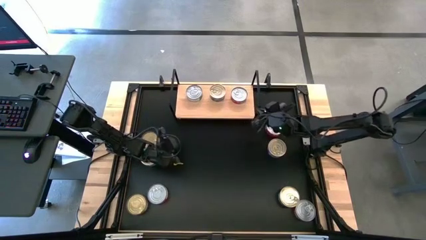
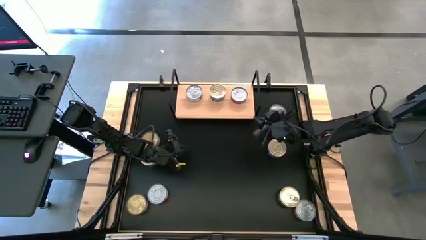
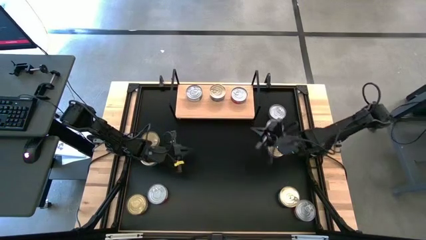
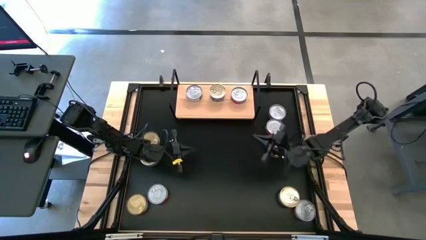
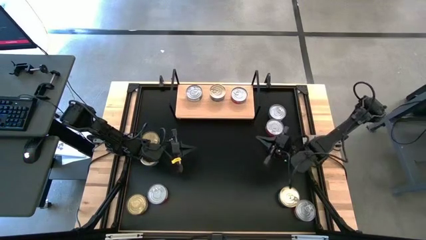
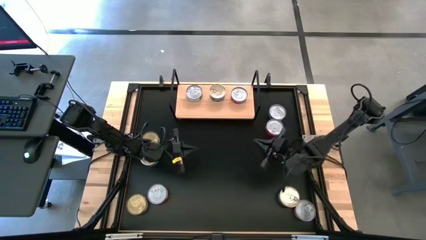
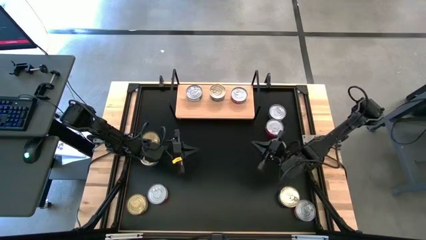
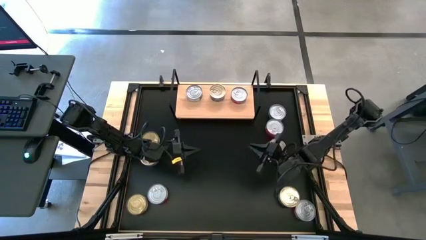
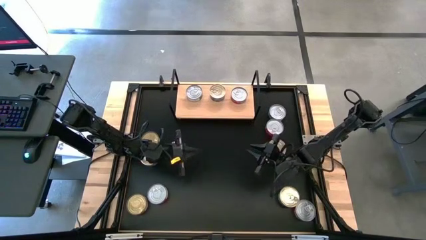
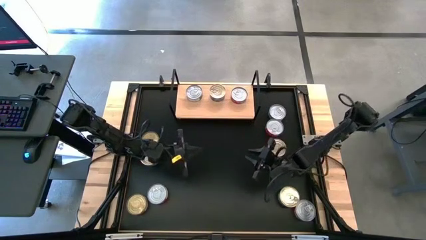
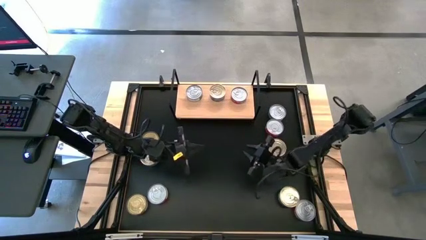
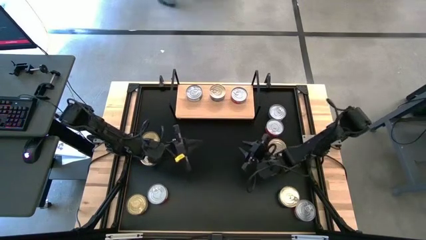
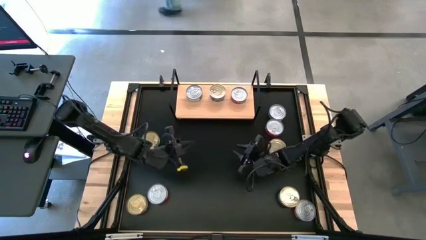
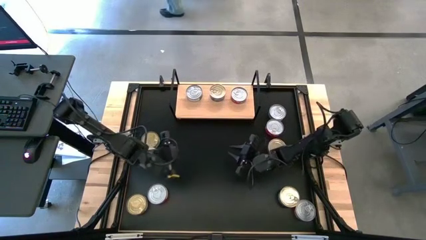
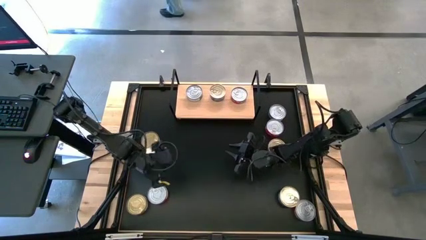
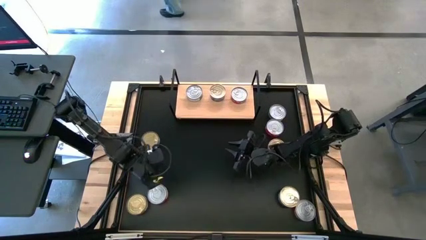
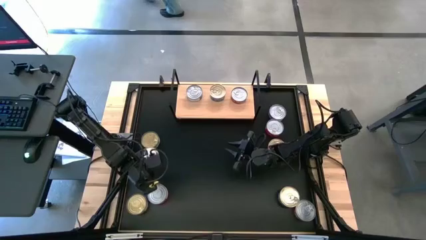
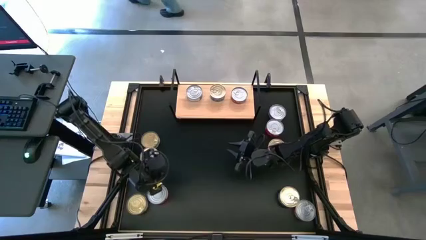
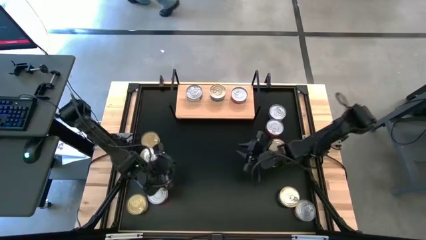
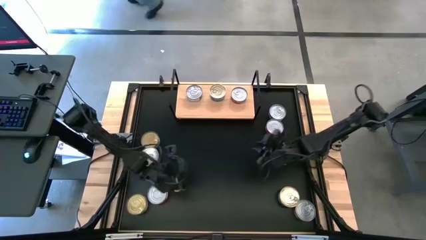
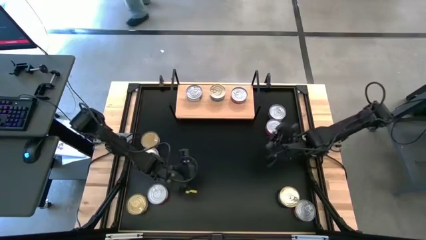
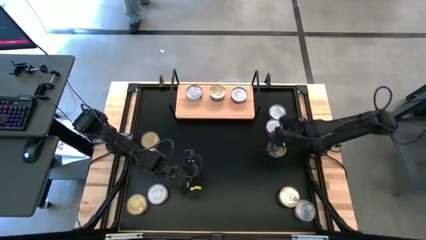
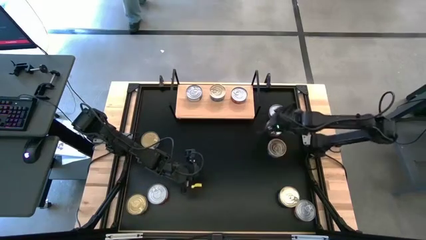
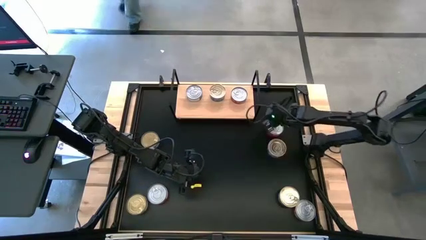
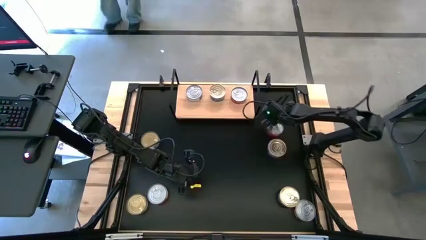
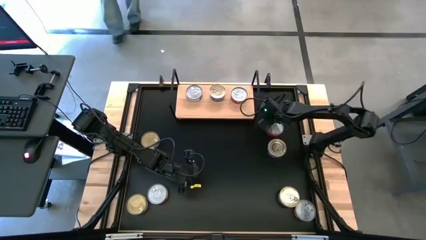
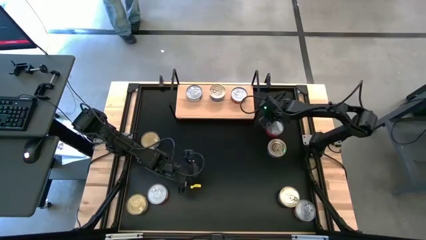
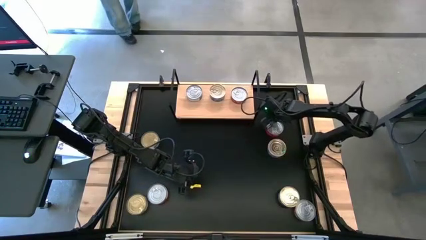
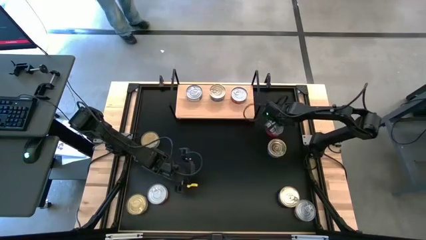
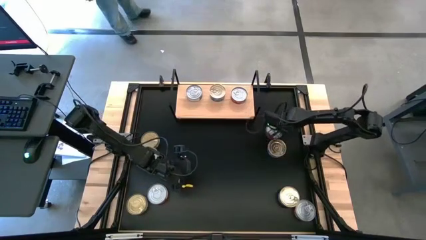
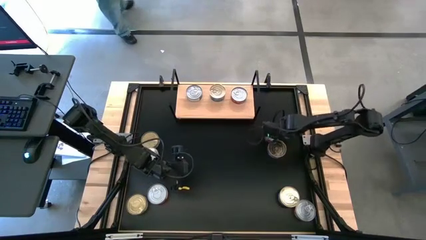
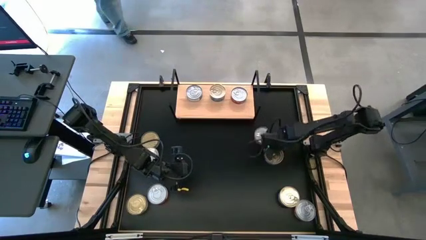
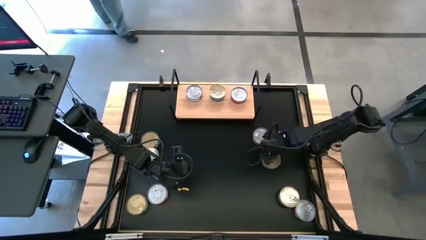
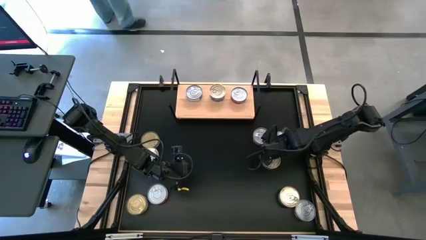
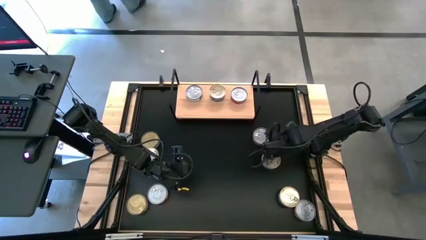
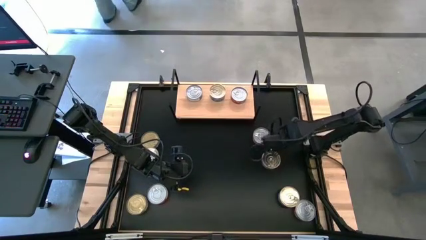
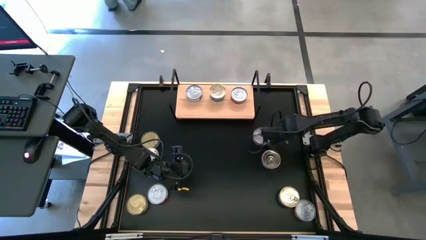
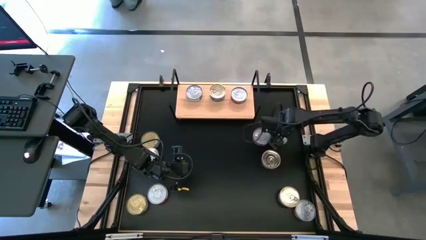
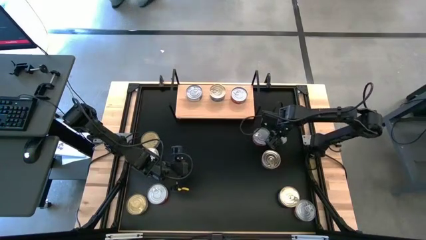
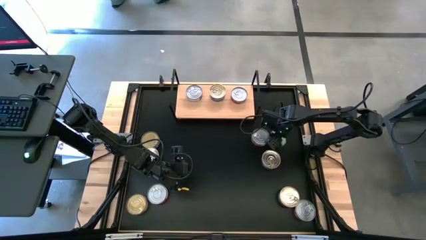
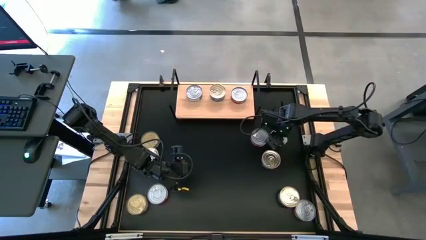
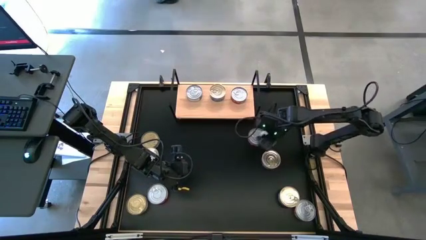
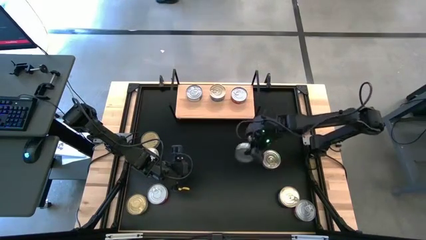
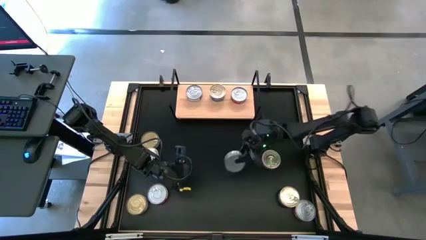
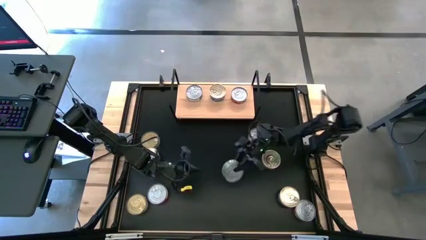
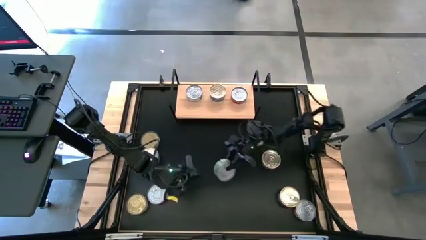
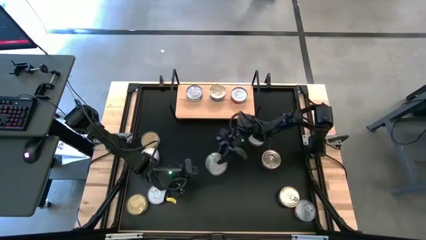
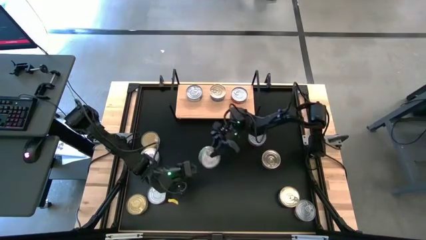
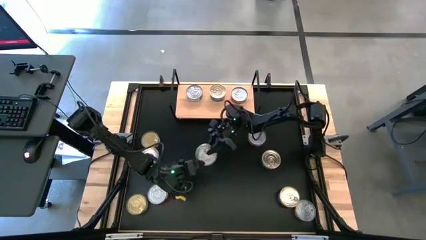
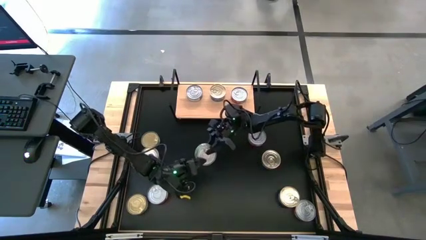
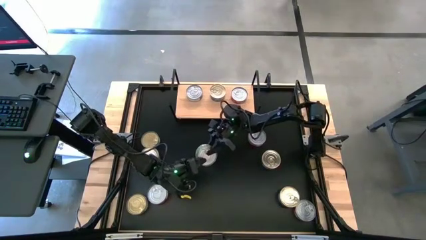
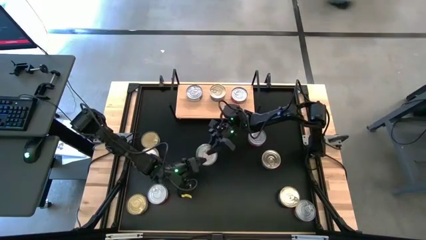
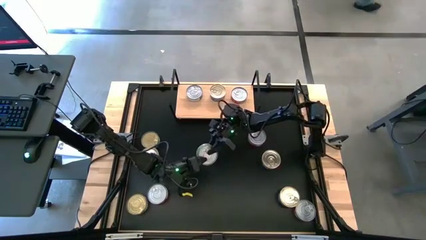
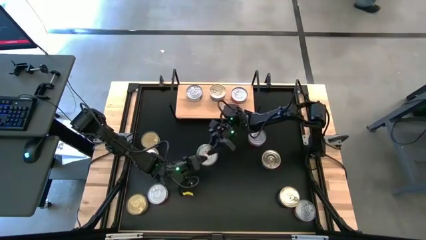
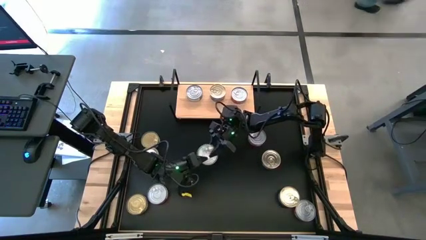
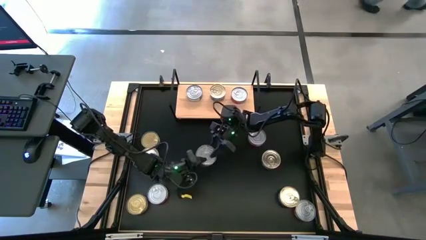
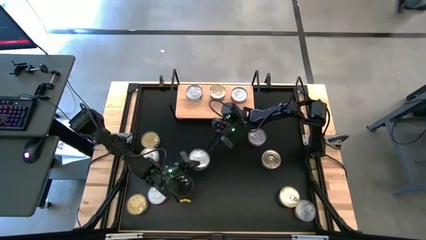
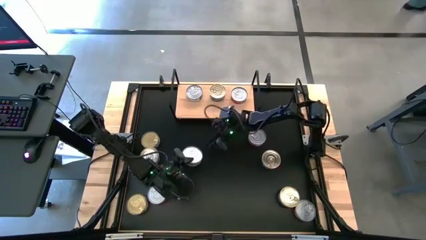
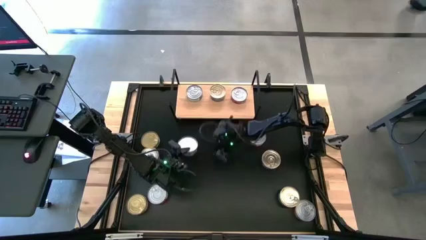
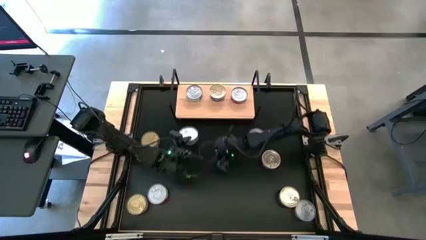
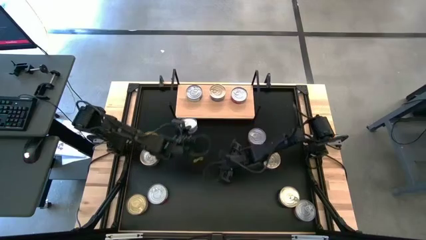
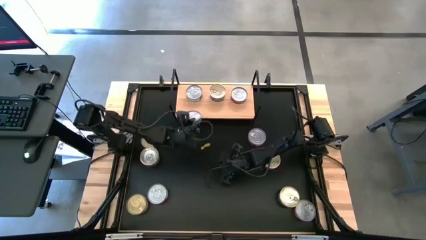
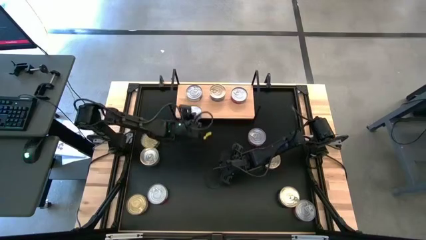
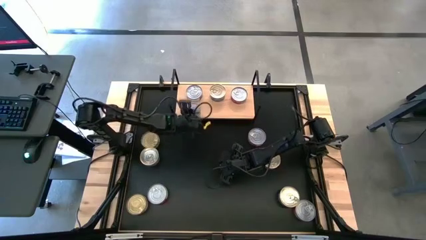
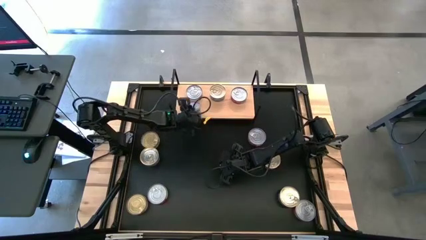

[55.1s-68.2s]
Task: Stack canned seafood by type on shelf
Put the green tuna can on the shelf

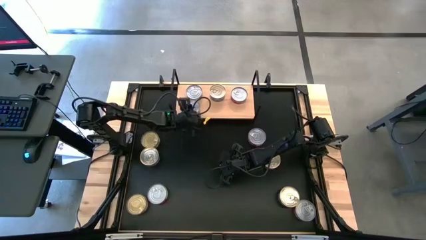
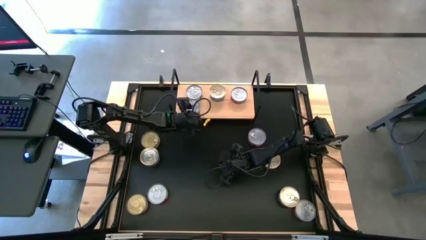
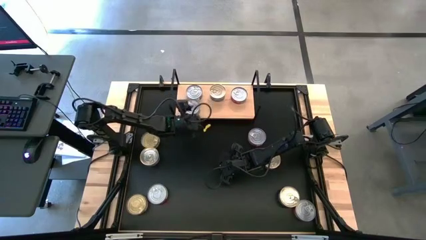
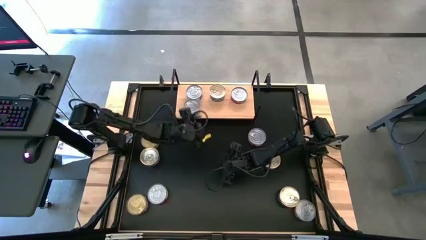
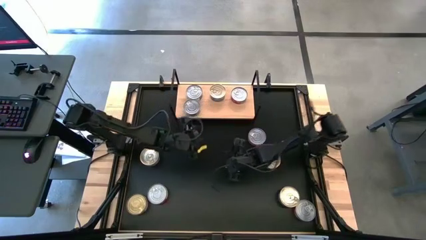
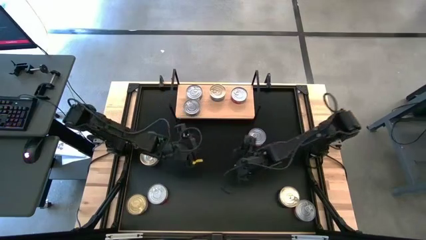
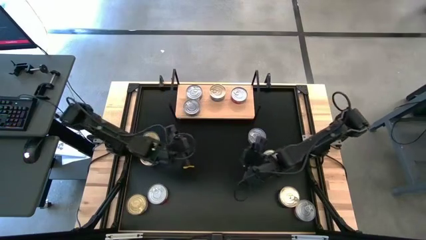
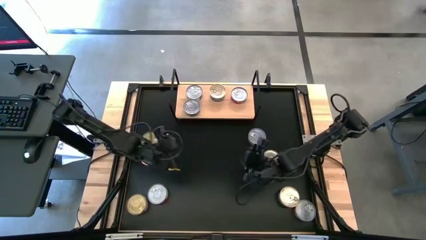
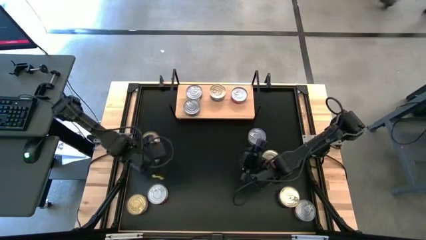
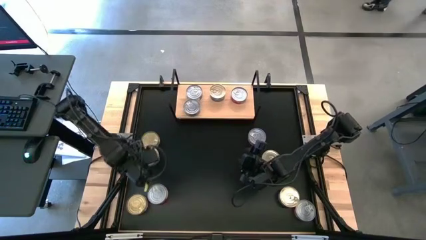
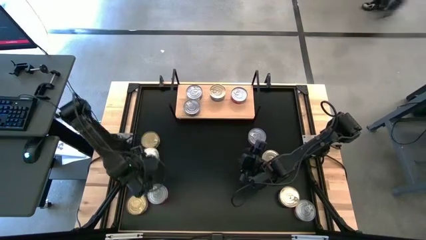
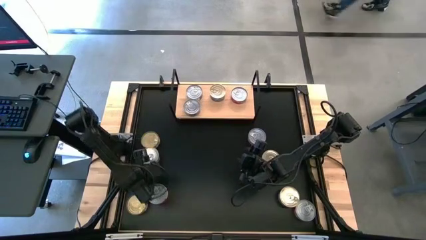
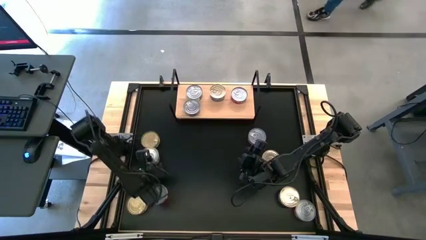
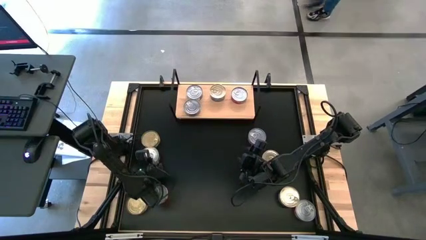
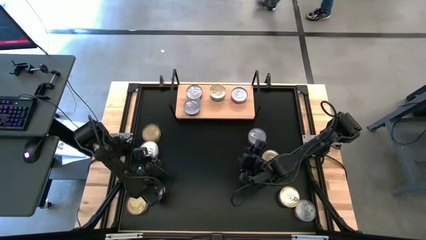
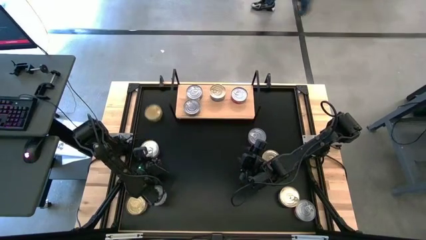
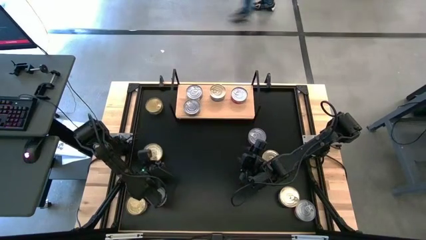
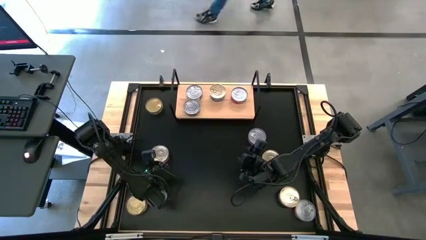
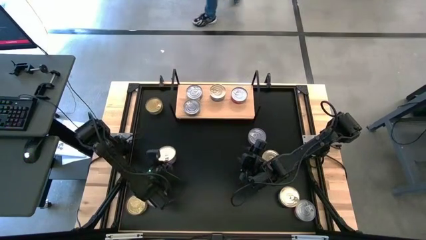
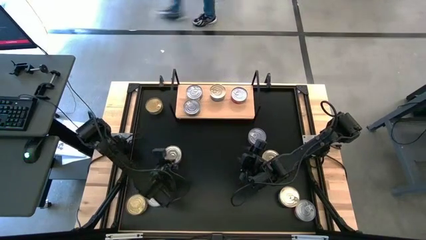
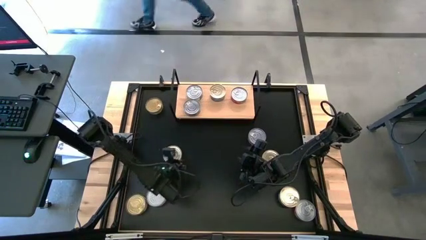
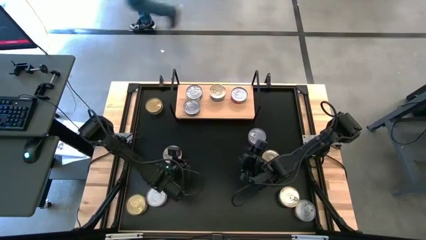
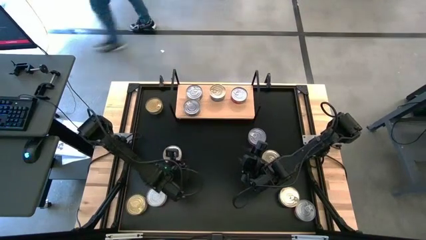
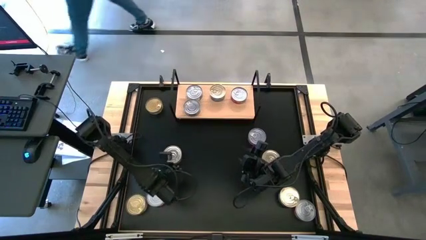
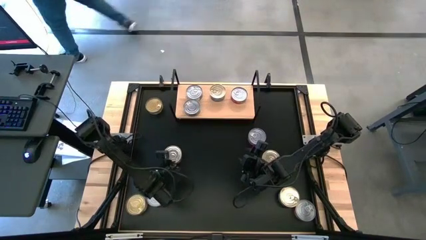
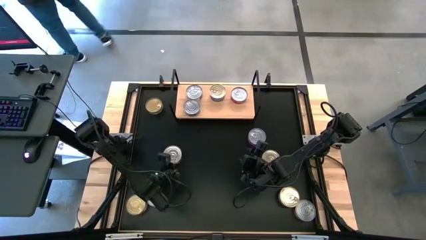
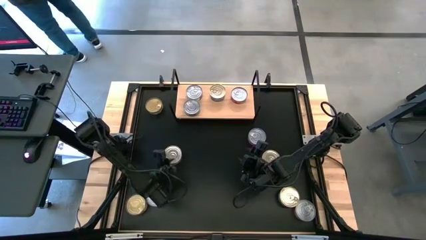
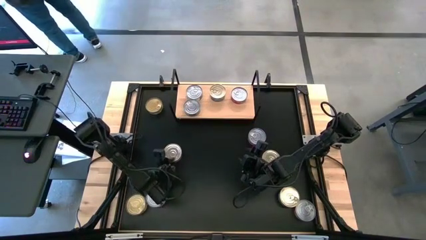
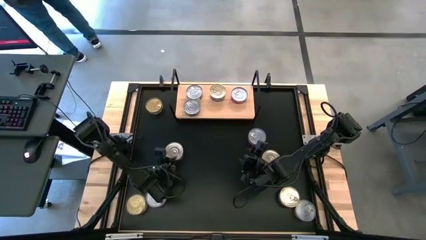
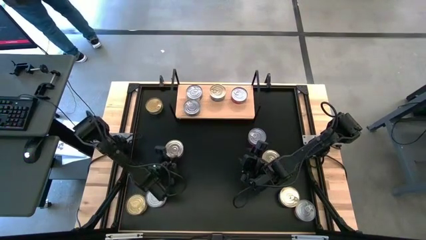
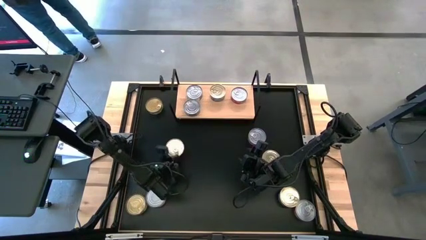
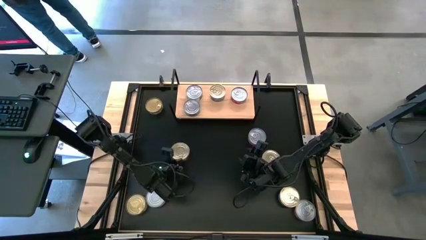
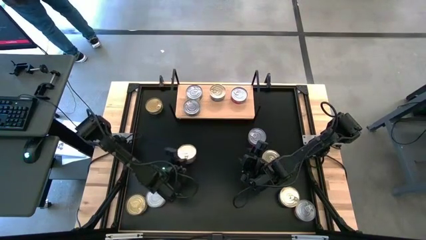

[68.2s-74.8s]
Put the blue-pink tuna can on the shelf
